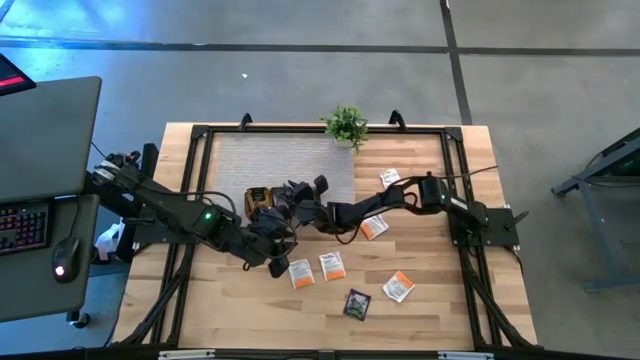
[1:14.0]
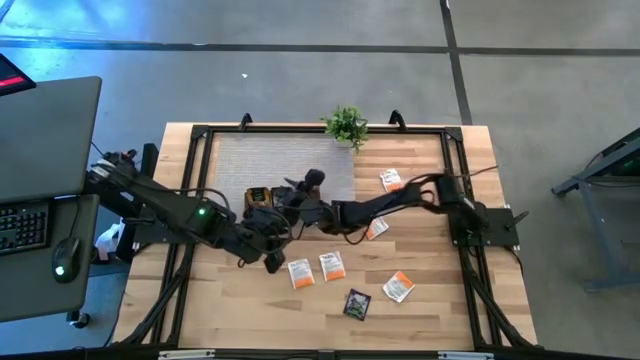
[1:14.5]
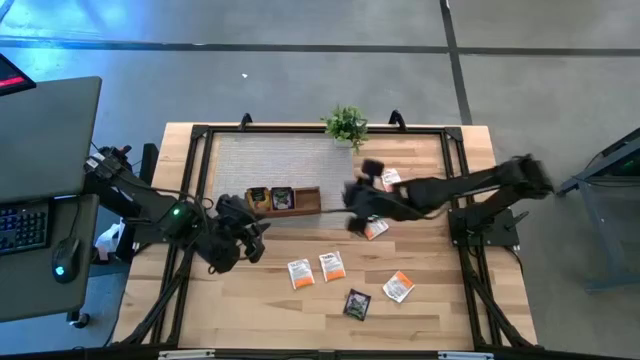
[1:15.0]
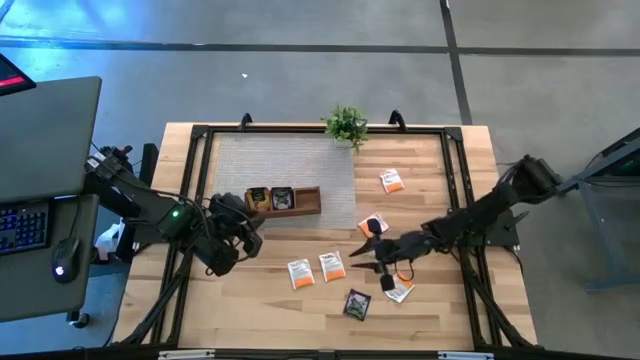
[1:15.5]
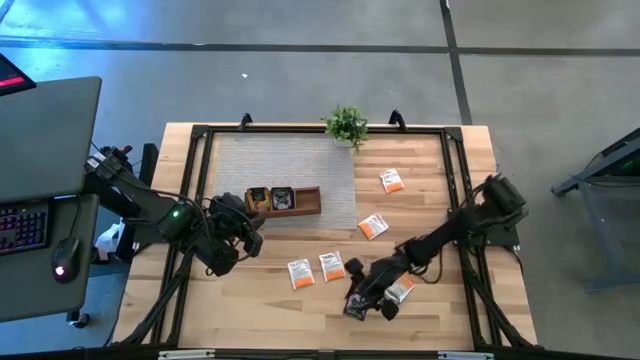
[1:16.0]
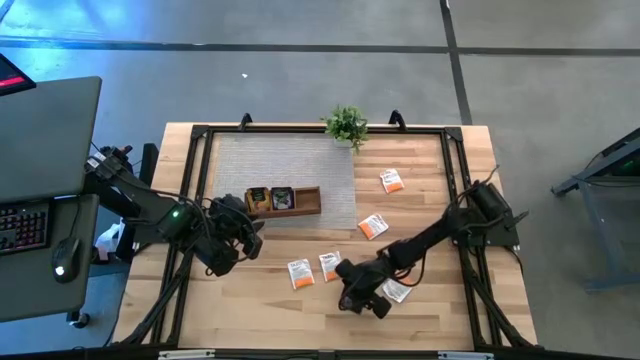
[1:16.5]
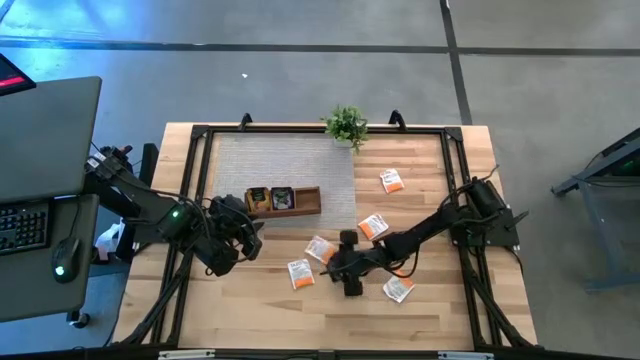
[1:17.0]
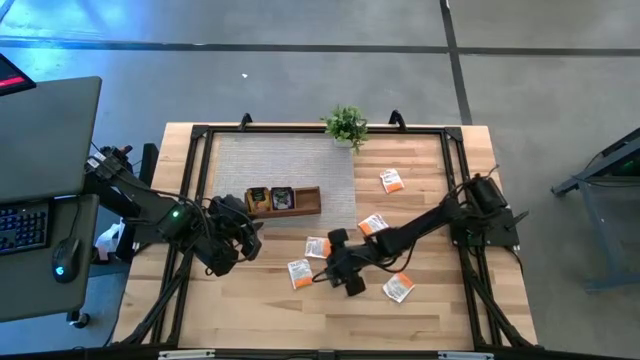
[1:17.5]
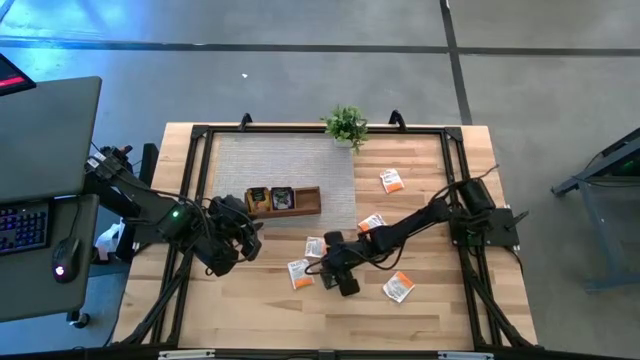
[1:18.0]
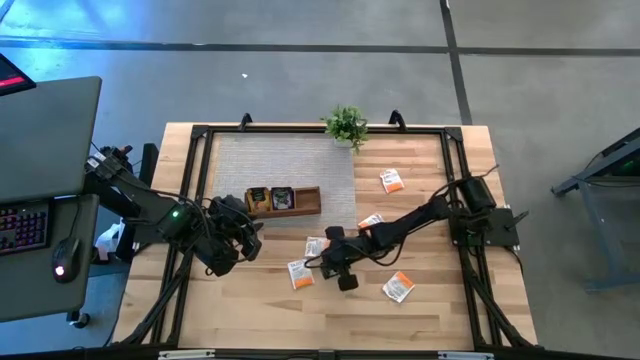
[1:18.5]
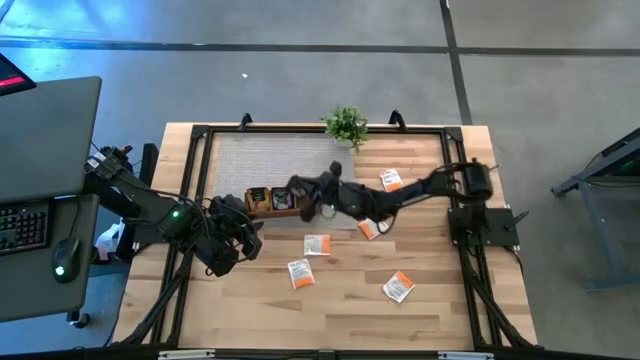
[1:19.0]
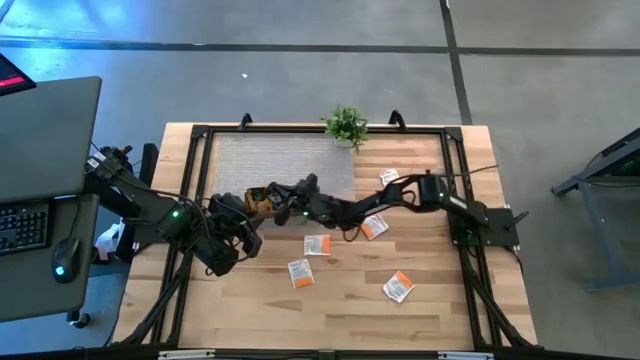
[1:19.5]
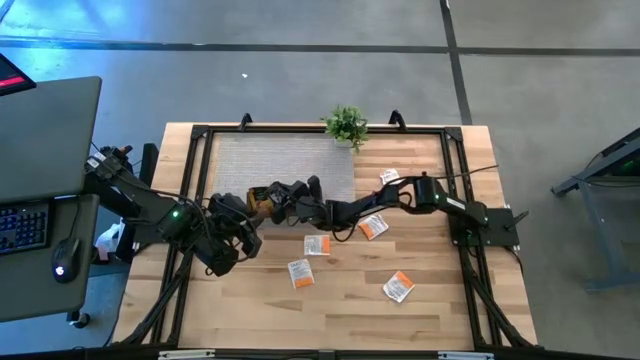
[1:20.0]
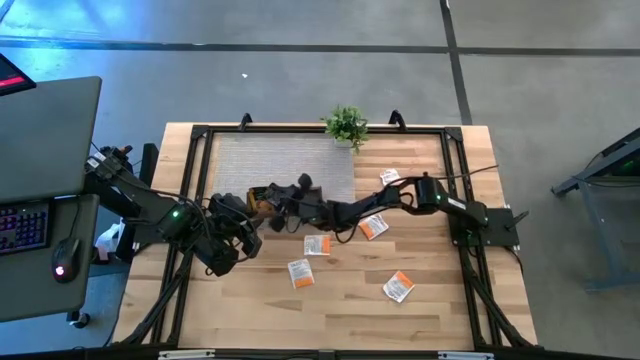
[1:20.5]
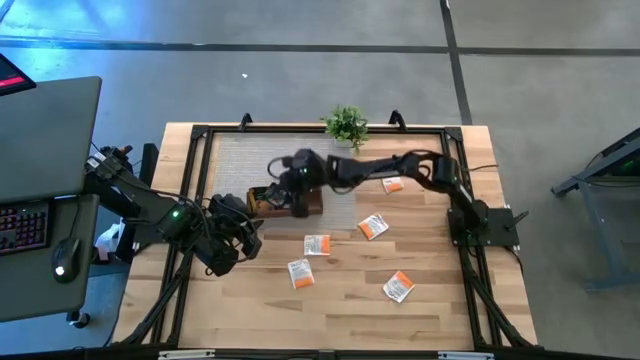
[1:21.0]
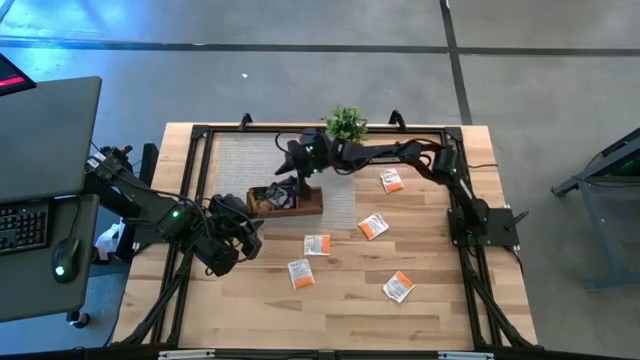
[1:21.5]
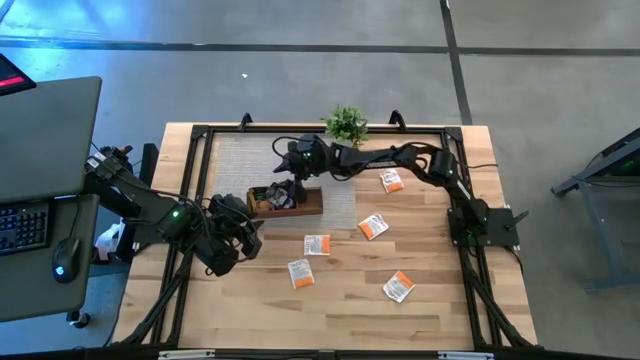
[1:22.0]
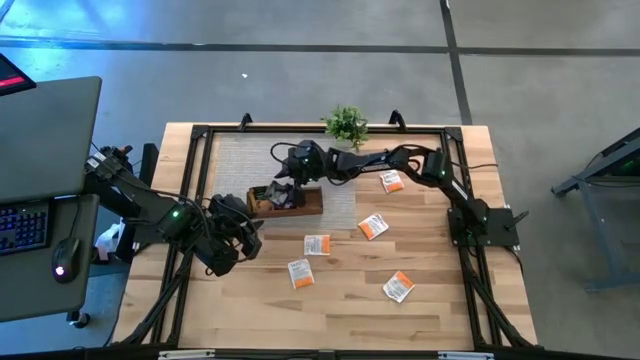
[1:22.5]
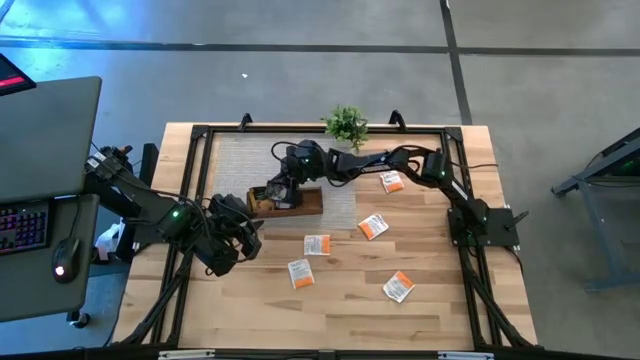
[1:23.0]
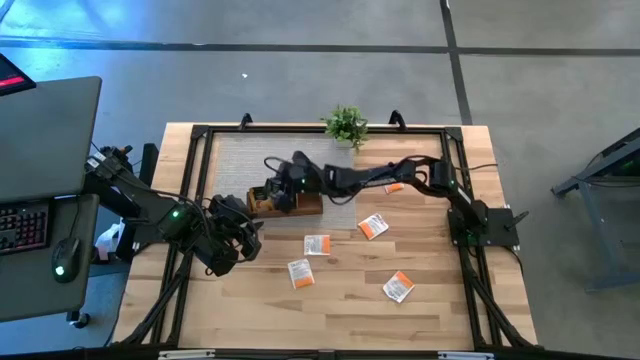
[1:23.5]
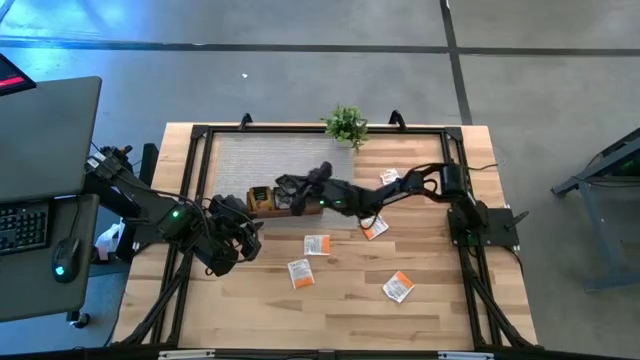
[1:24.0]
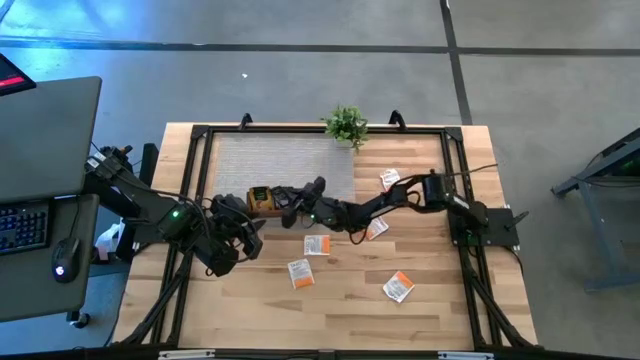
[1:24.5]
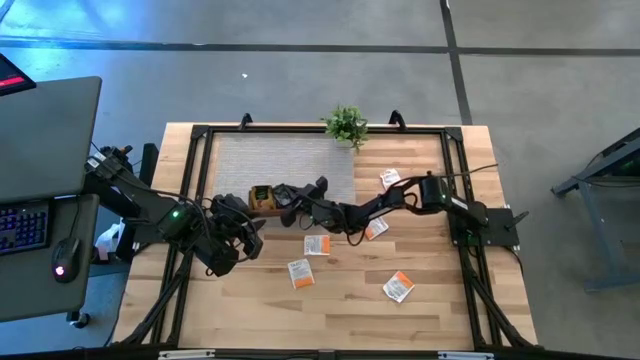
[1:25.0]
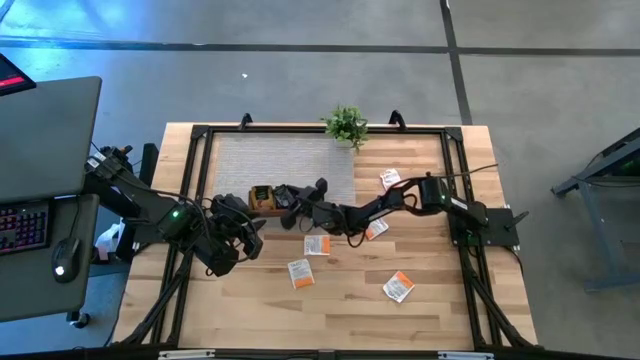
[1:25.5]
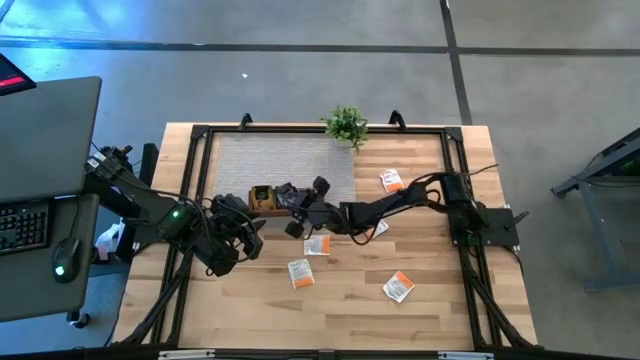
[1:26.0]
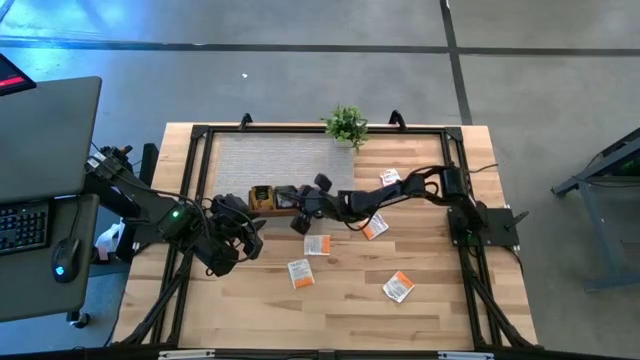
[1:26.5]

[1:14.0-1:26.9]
Task: Pick & Place Tea
Put the purple tea bag into the middle section of the wooden organizer

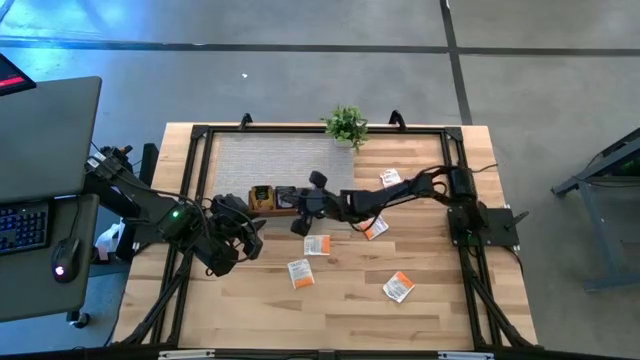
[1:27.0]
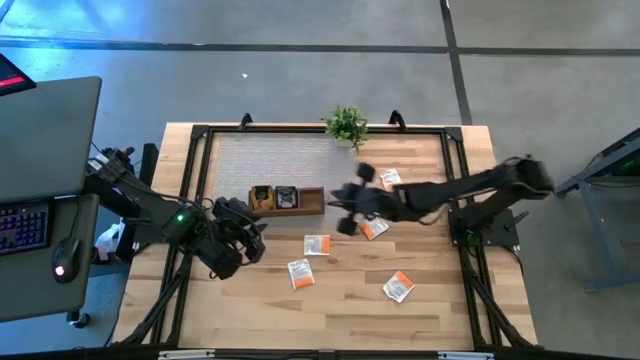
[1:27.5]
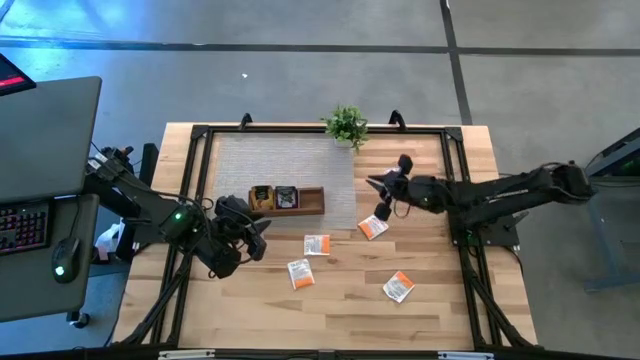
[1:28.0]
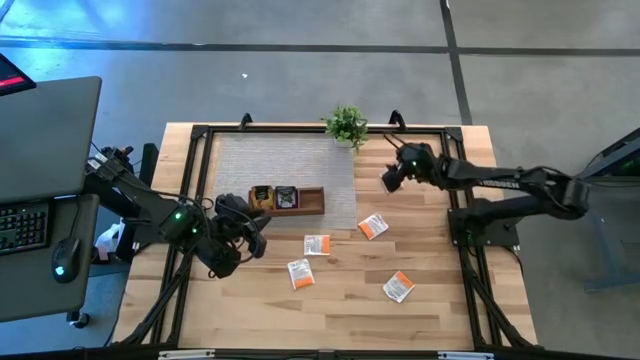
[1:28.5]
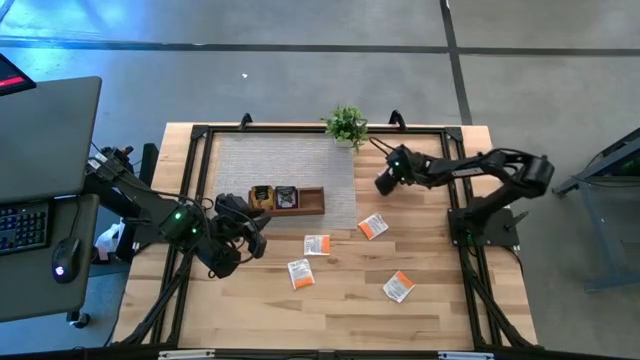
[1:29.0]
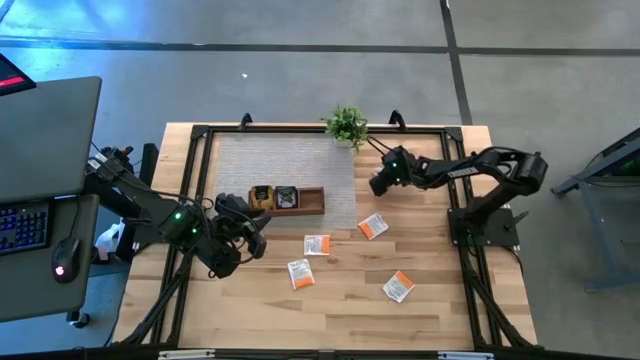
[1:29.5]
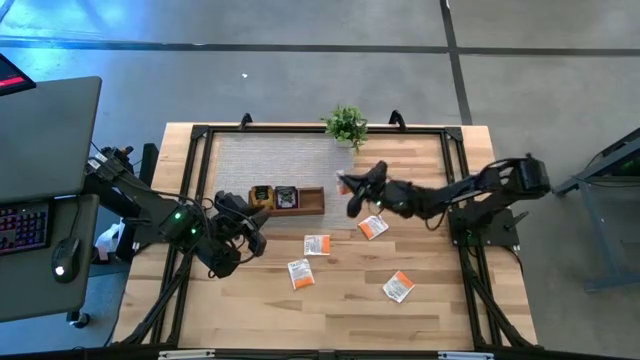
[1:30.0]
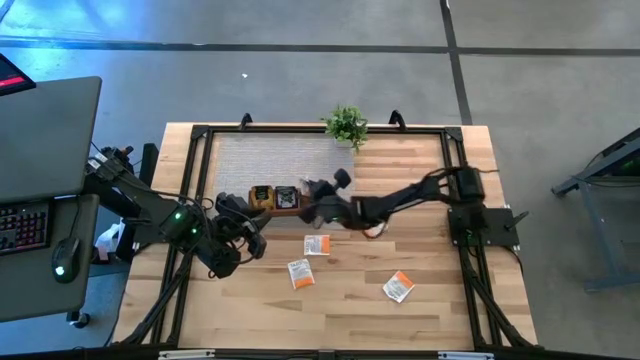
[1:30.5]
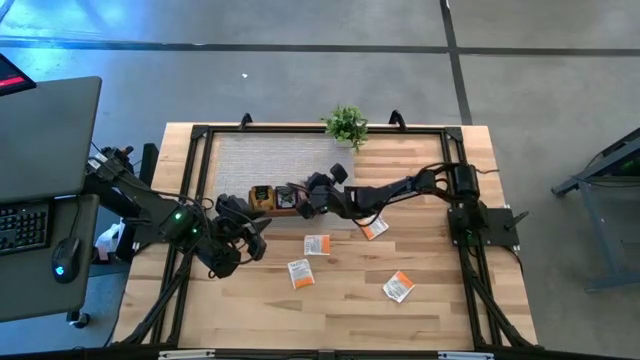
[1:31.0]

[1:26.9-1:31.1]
Put the orange tea bag into the right section of the wooden organizer

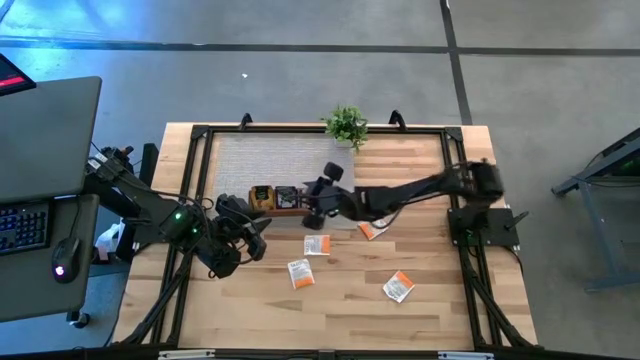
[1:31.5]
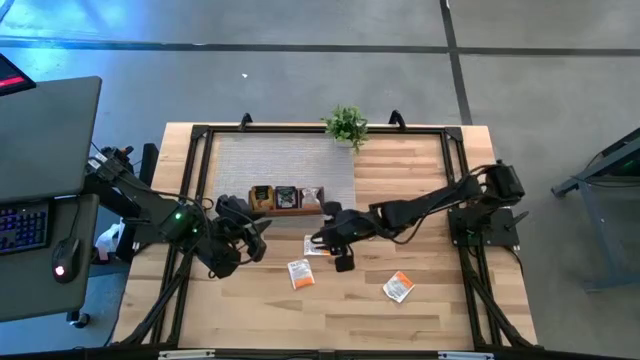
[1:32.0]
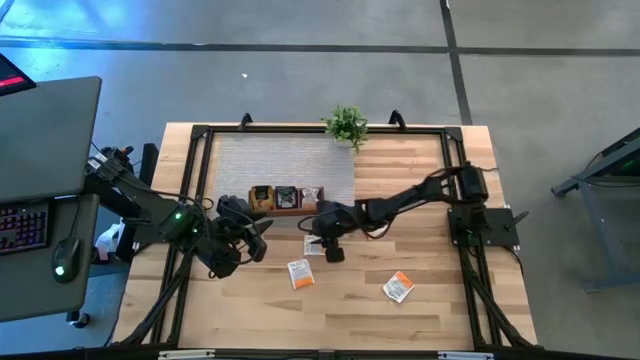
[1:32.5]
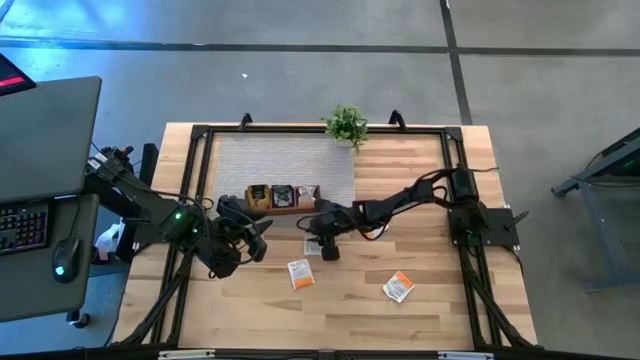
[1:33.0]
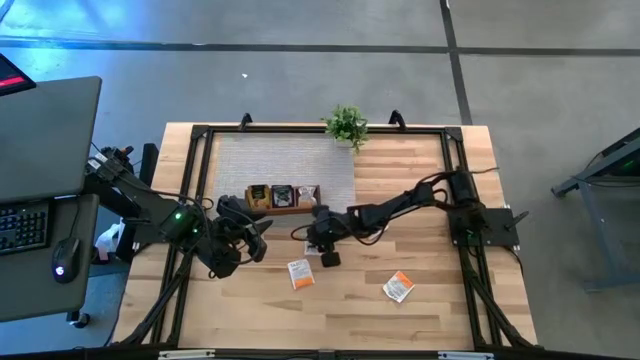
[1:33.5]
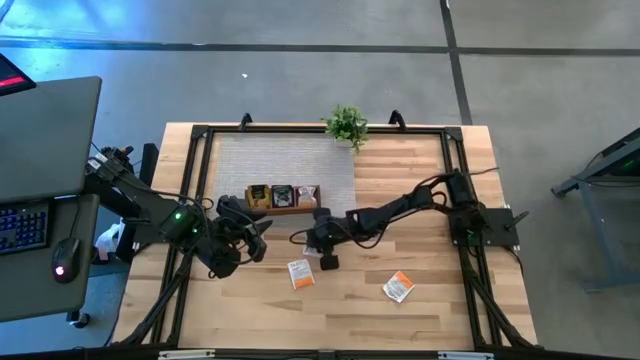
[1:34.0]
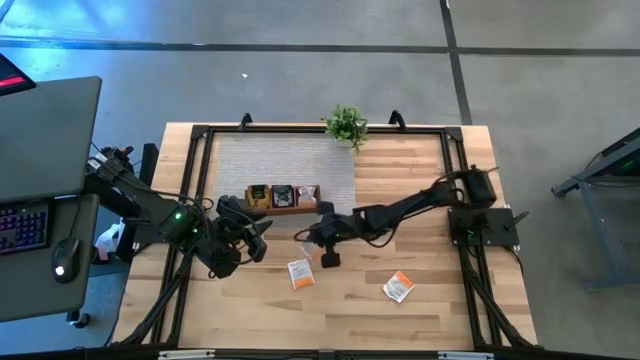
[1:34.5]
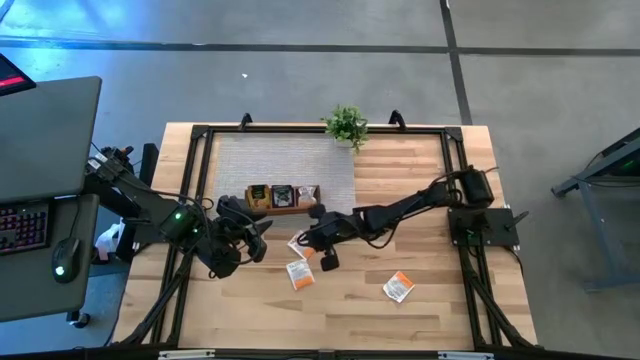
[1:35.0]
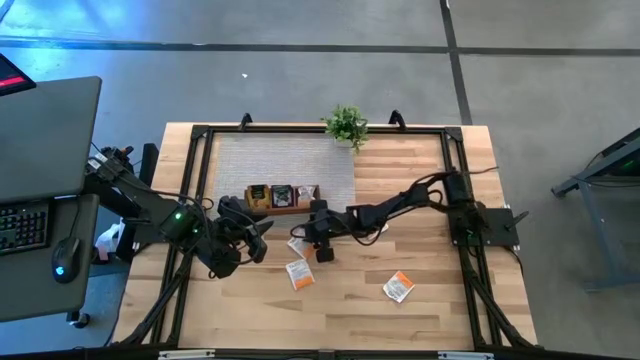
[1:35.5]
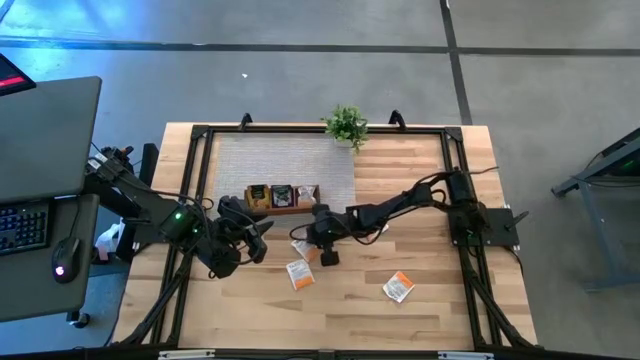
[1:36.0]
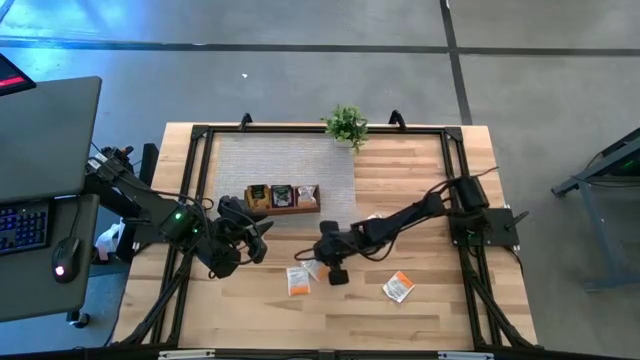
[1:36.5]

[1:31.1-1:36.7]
Put the orange tea bag into the right section of the wooden organizer
